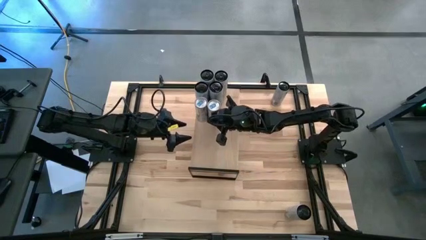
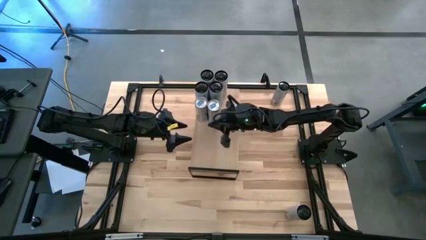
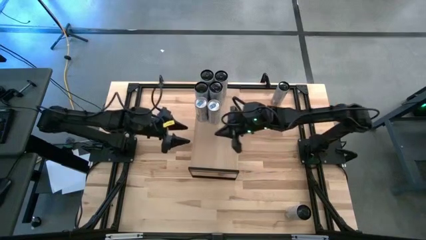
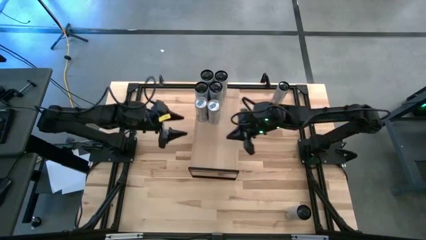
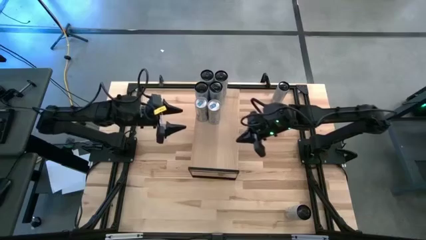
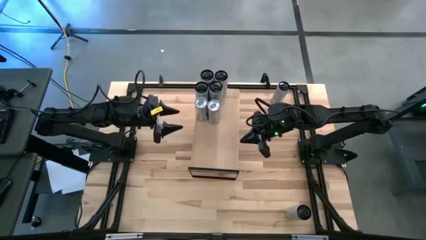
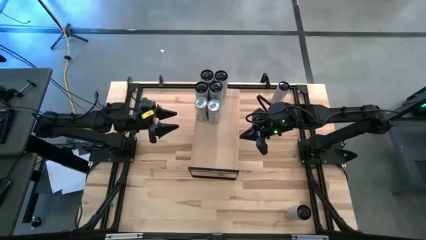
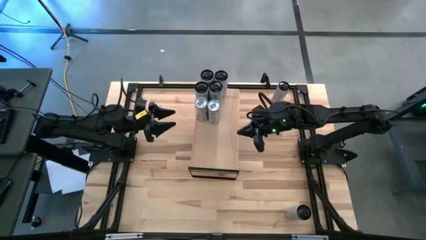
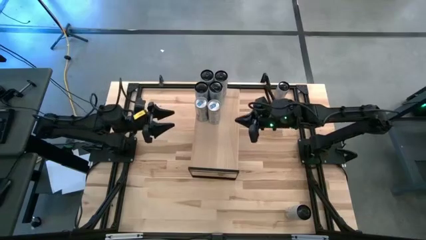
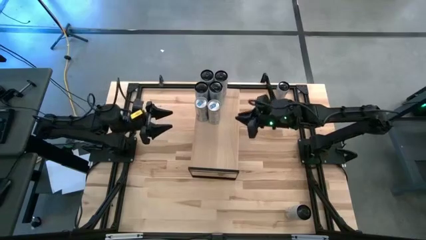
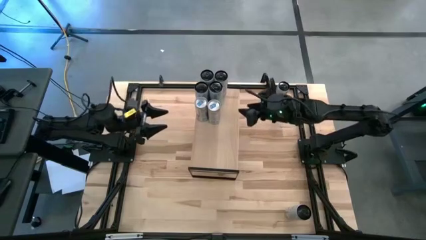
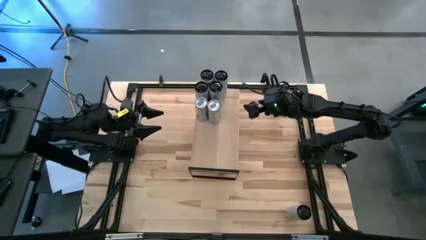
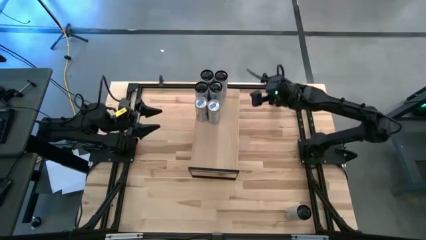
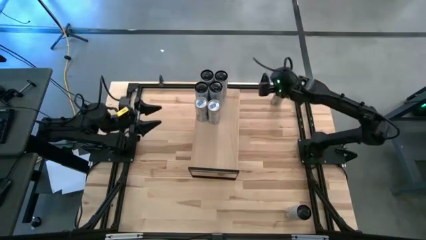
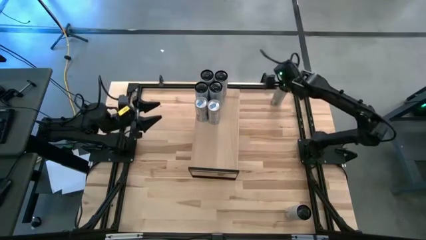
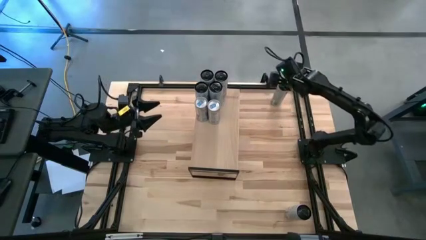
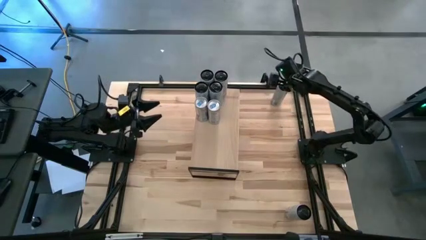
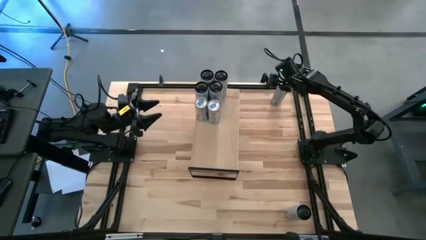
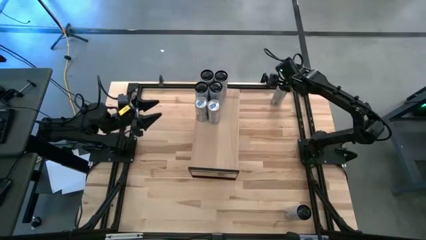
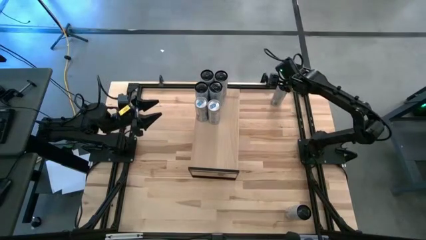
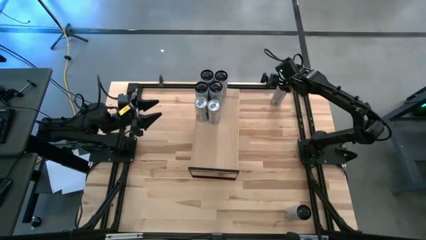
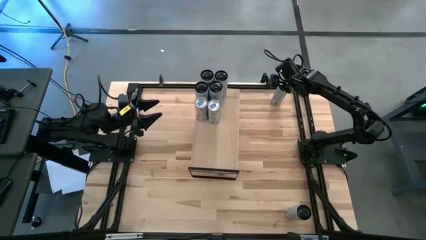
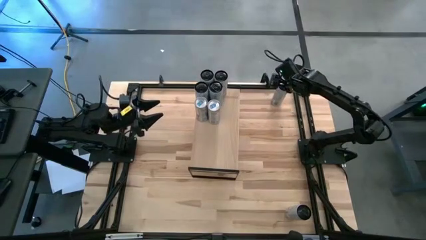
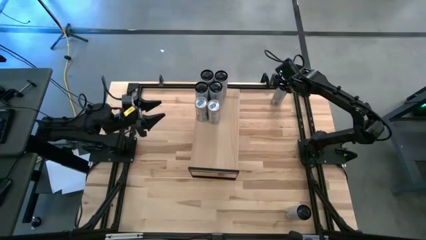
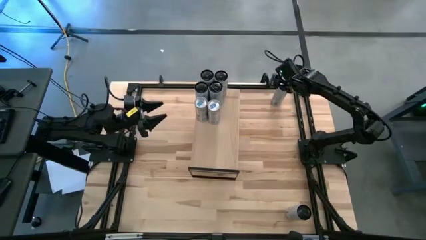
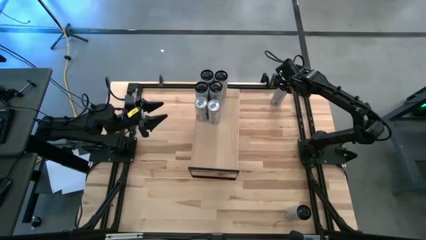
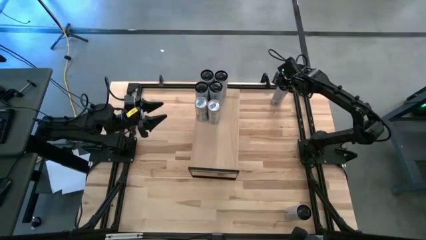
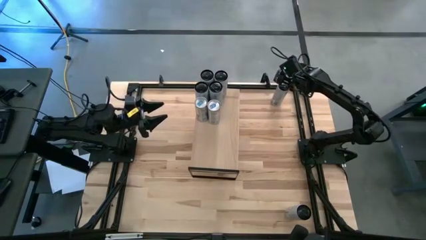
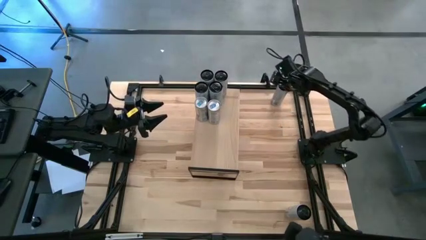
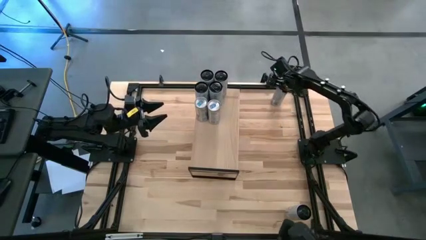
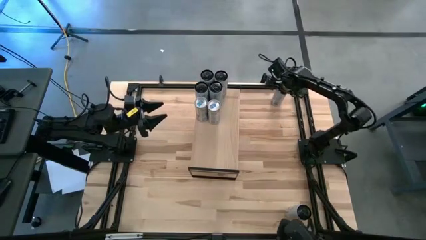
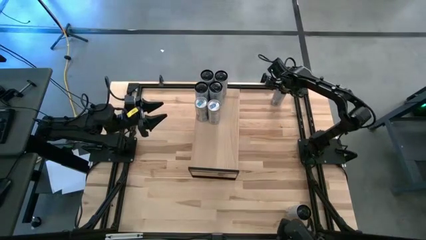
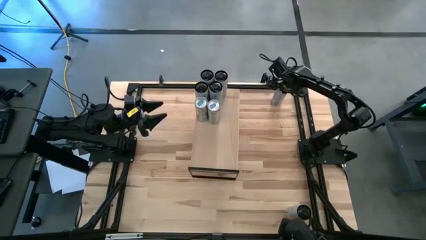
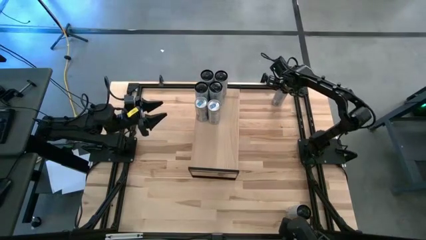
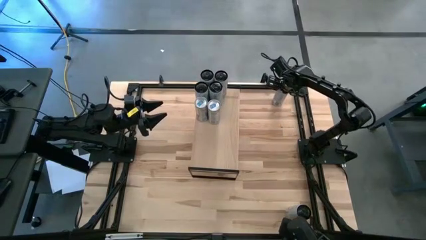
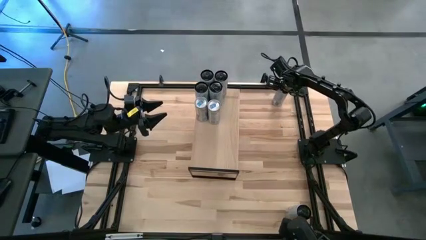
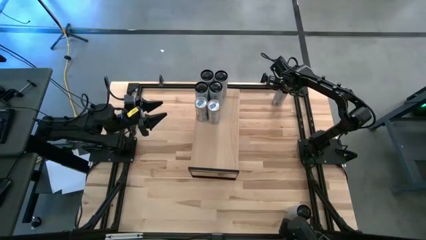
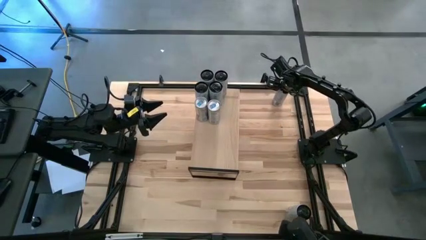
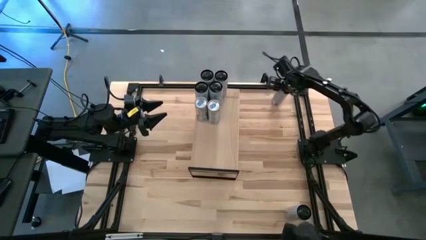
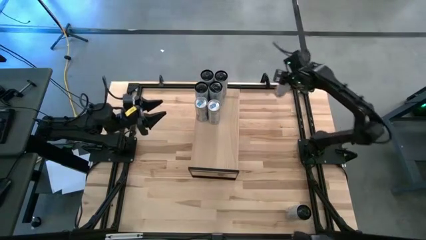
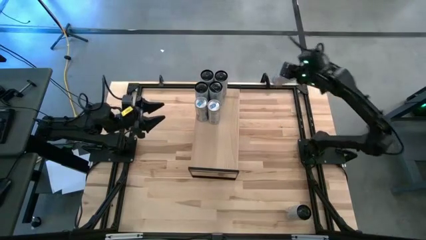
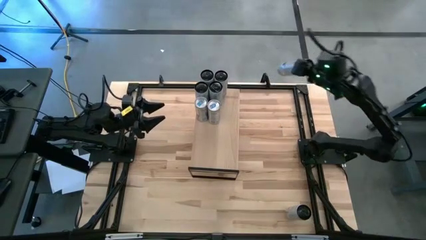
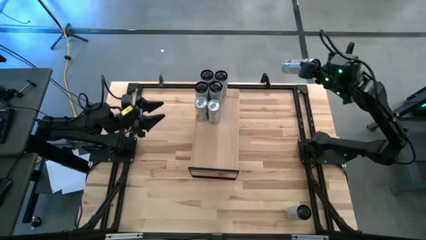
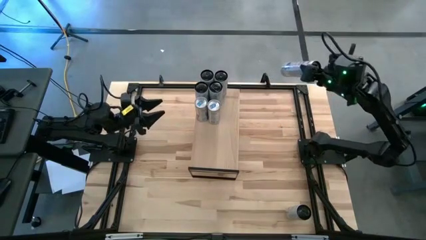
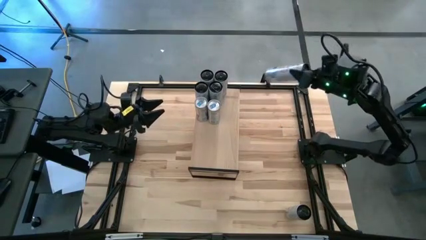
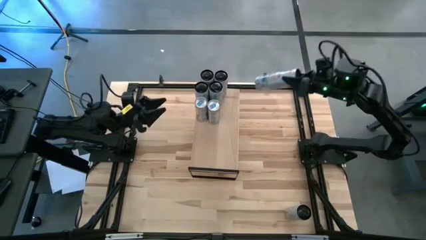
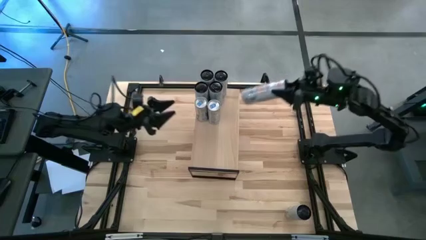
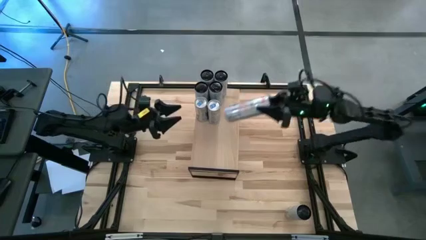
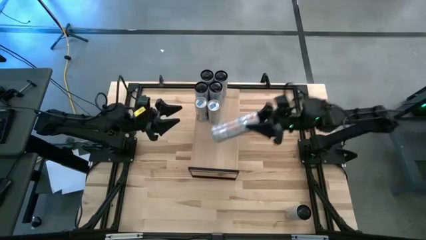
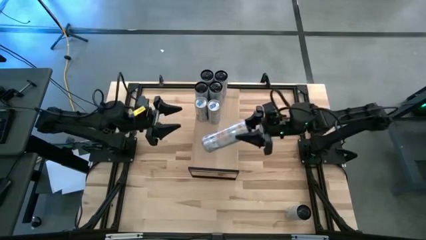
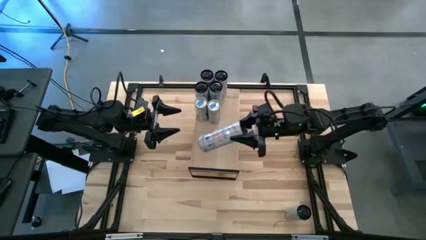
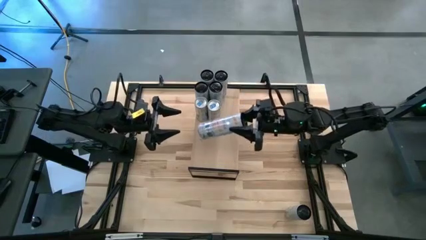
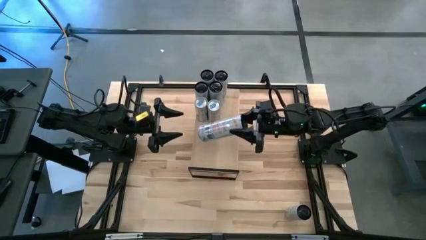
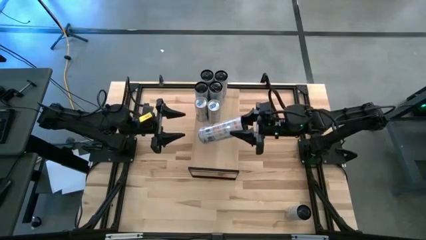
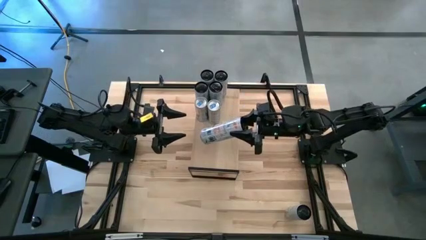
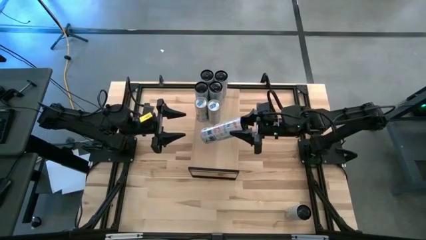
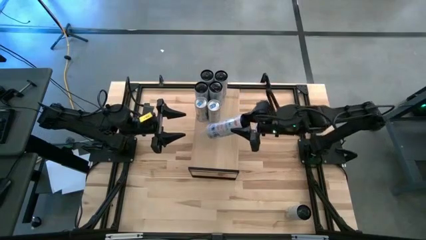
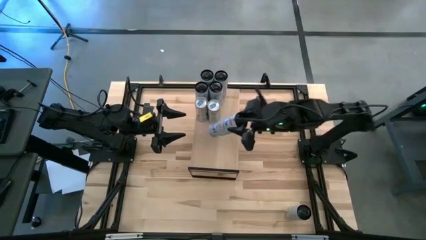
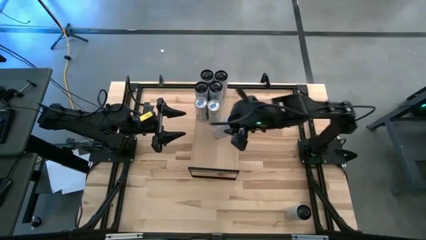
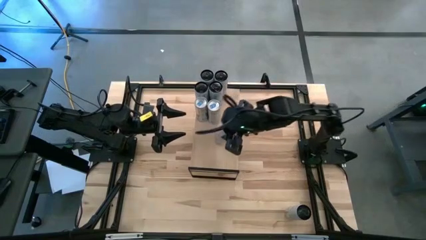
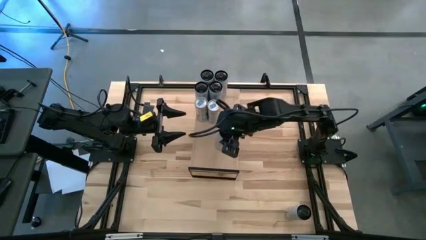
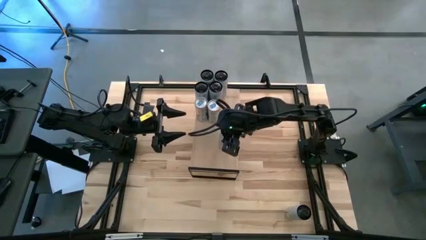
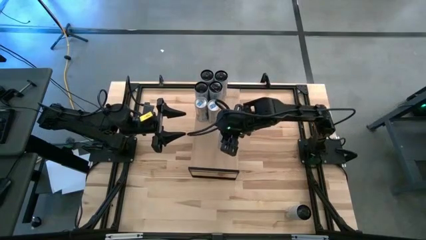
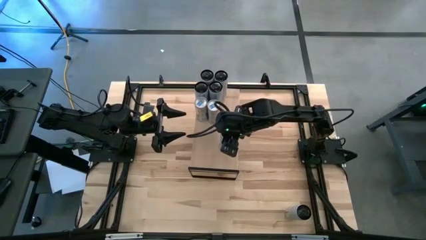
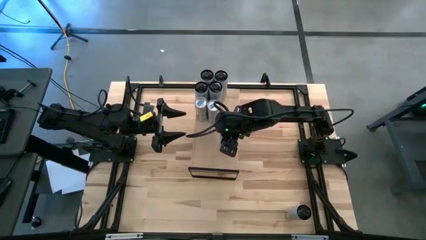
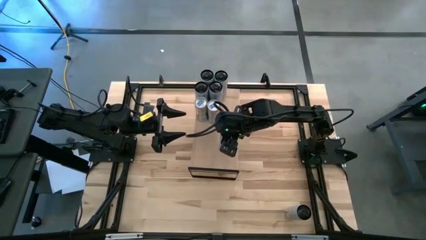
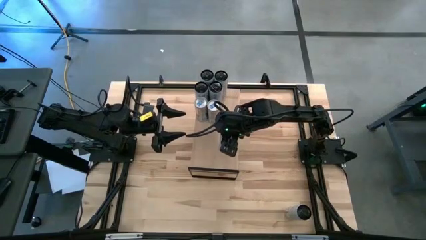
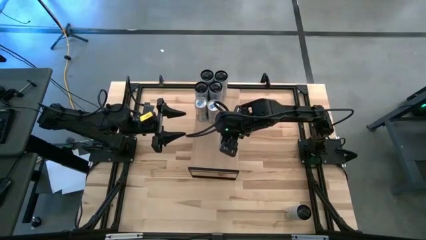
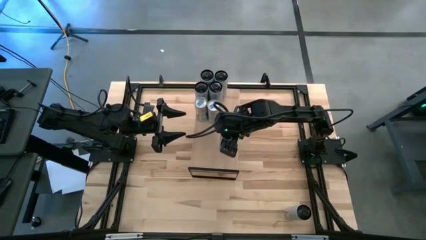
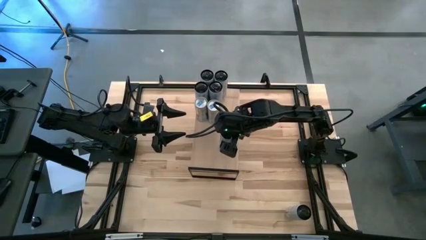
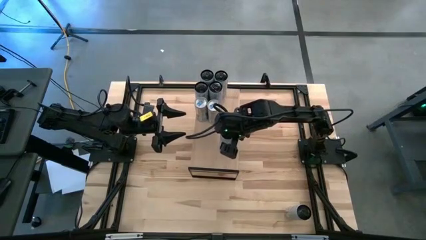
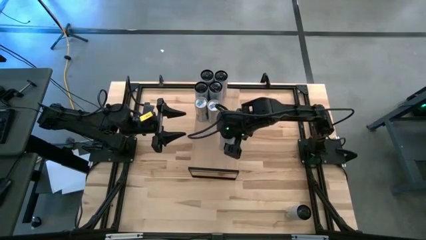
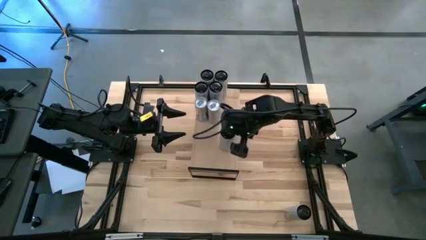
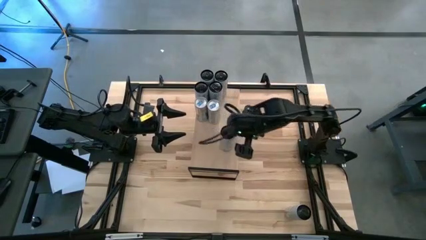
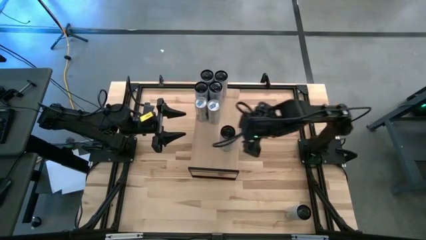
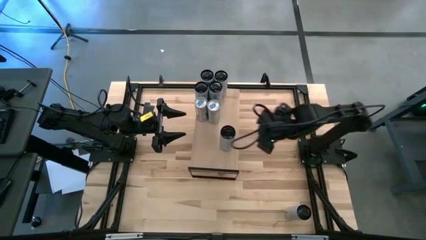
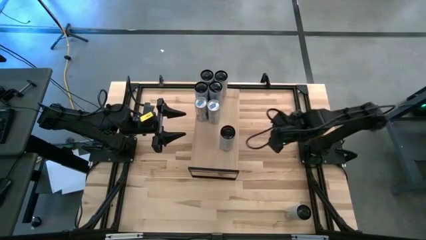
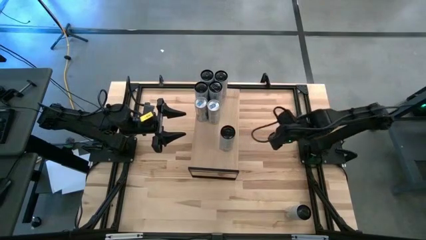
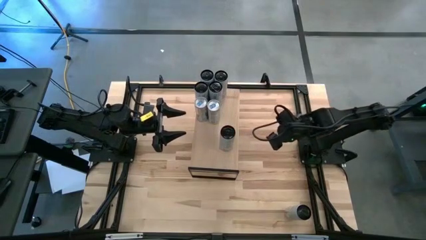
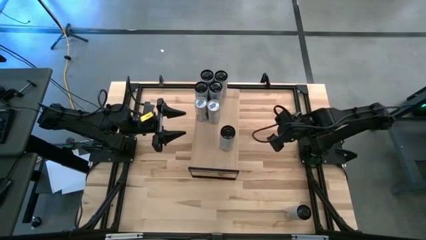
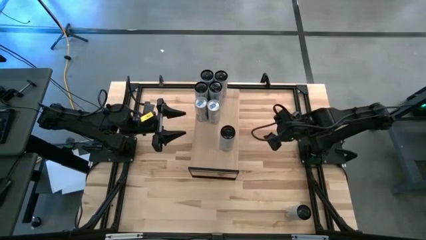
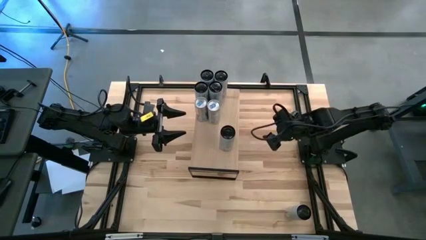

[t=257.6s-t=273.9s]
Task: Place canned beverage on shelf
Put the top white yellow soda can on the shelf
